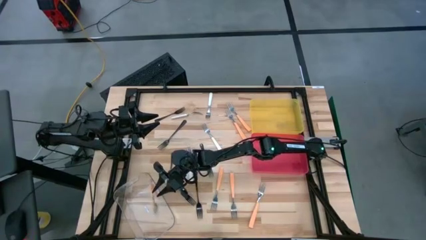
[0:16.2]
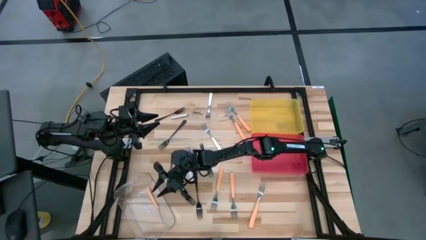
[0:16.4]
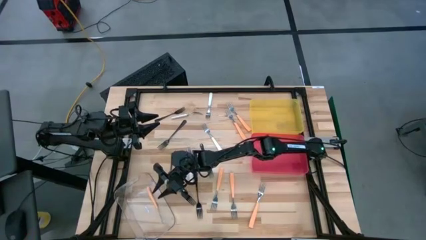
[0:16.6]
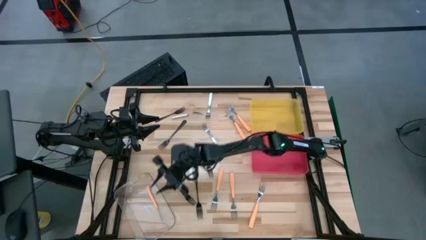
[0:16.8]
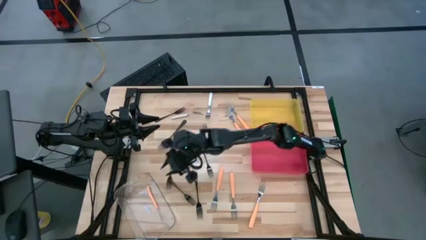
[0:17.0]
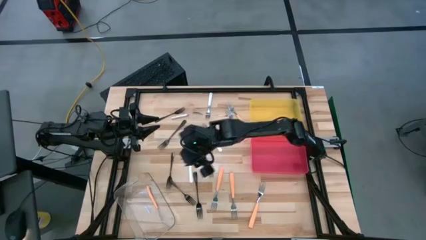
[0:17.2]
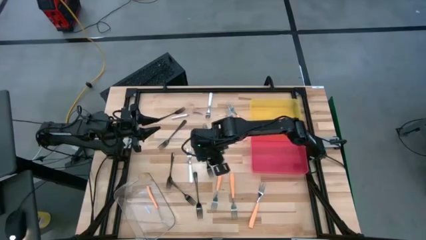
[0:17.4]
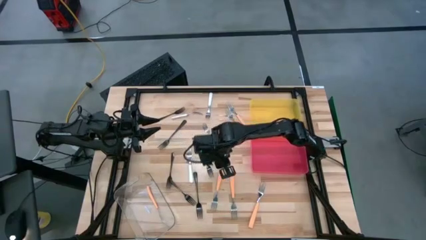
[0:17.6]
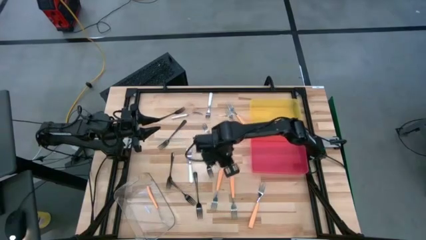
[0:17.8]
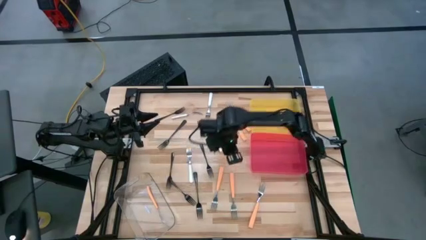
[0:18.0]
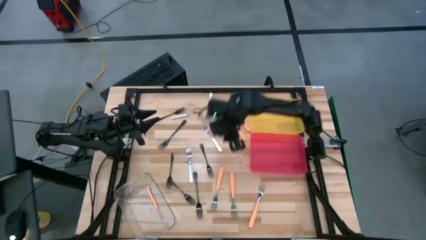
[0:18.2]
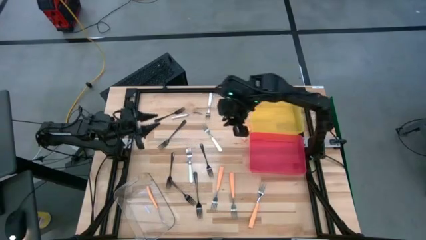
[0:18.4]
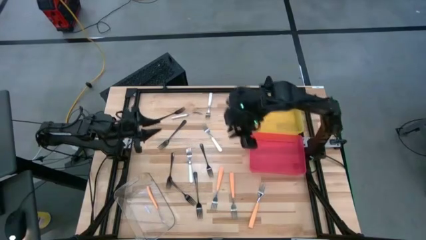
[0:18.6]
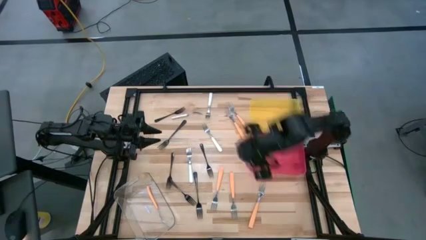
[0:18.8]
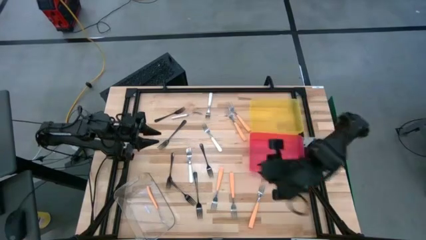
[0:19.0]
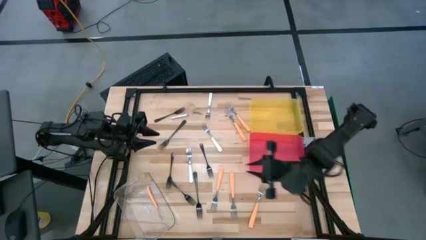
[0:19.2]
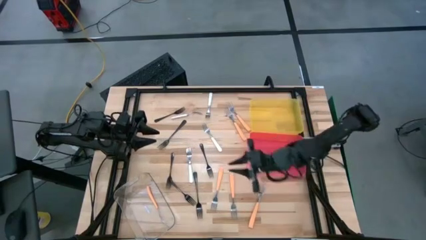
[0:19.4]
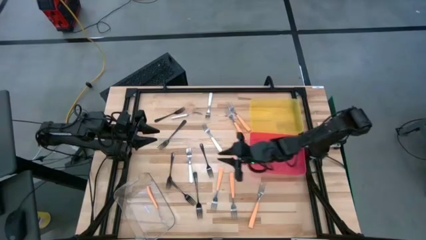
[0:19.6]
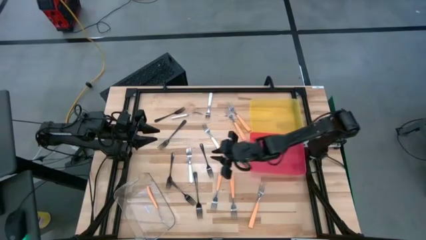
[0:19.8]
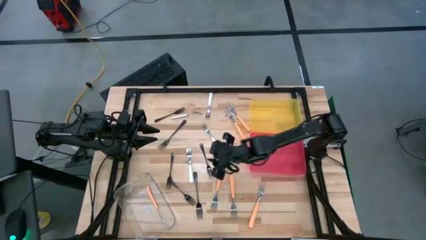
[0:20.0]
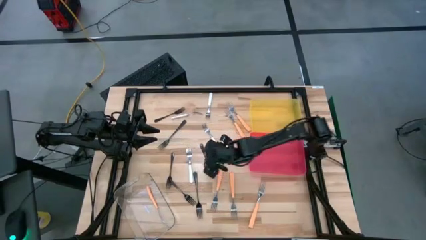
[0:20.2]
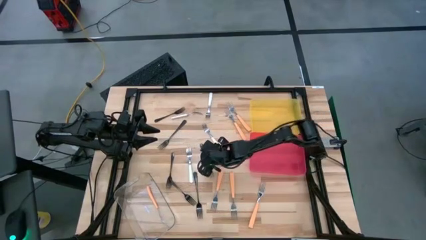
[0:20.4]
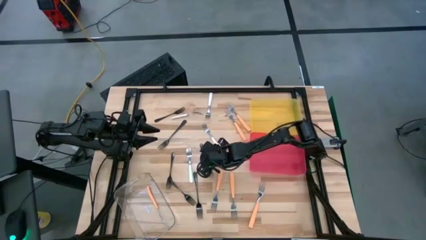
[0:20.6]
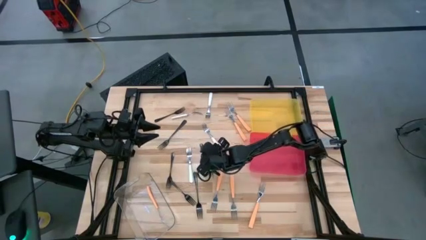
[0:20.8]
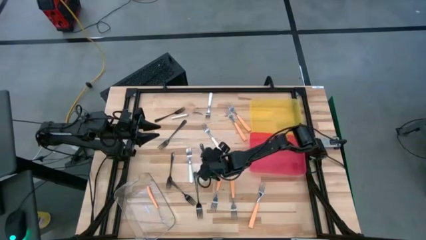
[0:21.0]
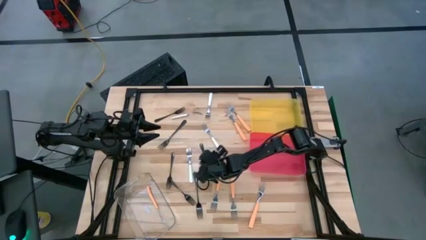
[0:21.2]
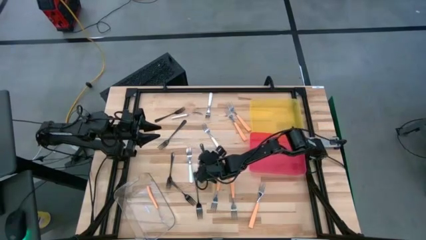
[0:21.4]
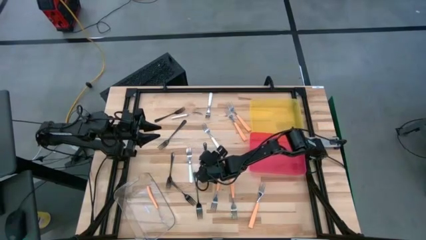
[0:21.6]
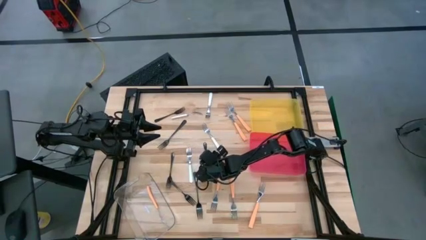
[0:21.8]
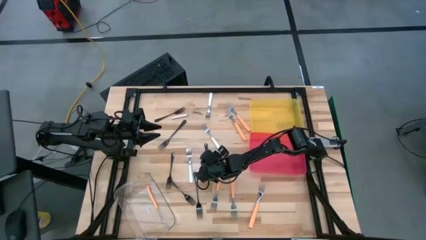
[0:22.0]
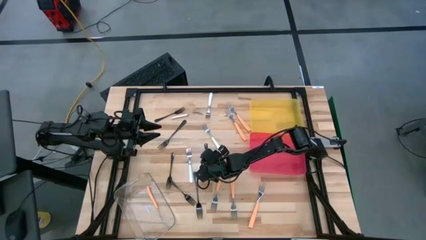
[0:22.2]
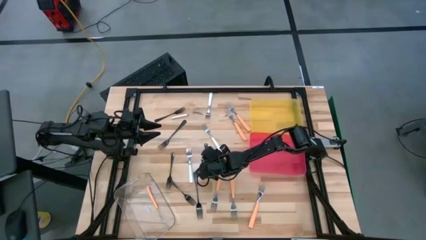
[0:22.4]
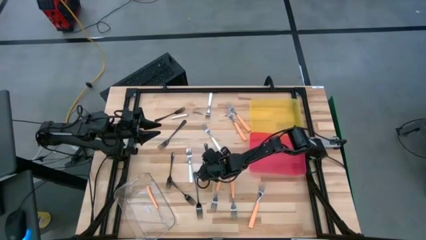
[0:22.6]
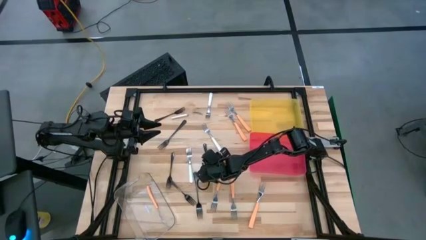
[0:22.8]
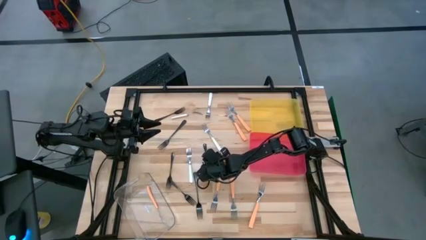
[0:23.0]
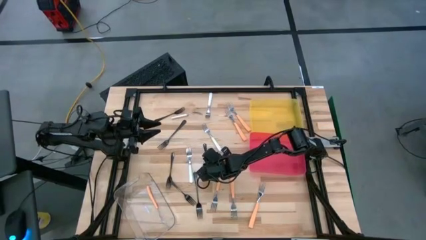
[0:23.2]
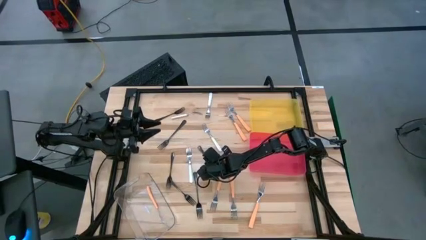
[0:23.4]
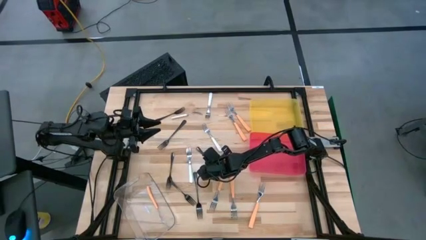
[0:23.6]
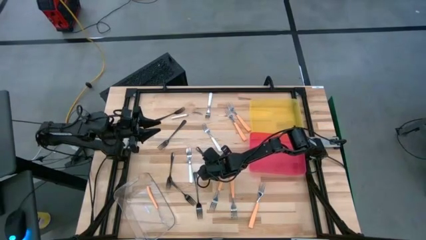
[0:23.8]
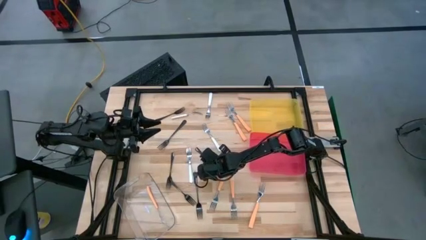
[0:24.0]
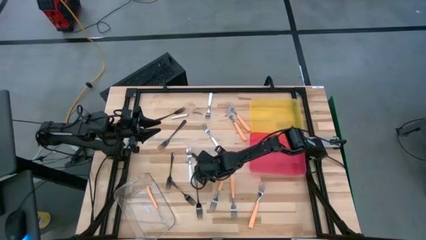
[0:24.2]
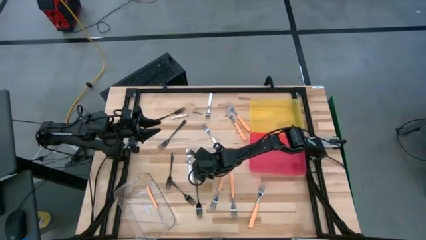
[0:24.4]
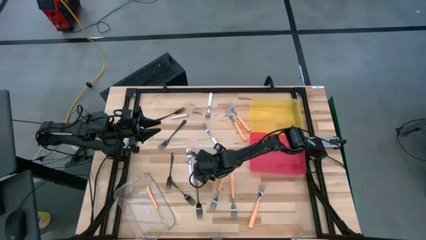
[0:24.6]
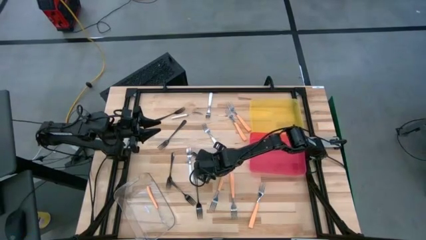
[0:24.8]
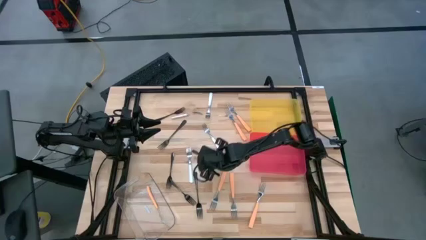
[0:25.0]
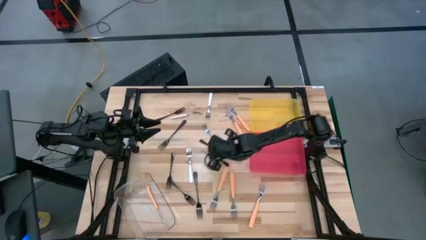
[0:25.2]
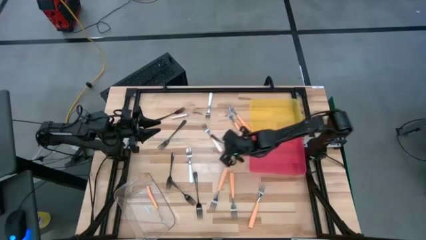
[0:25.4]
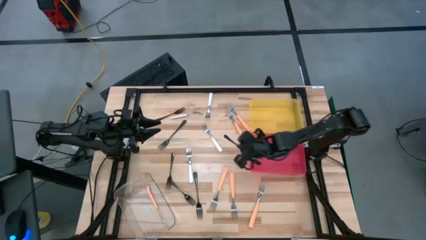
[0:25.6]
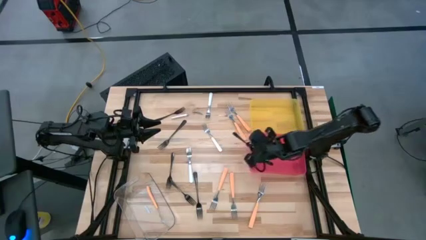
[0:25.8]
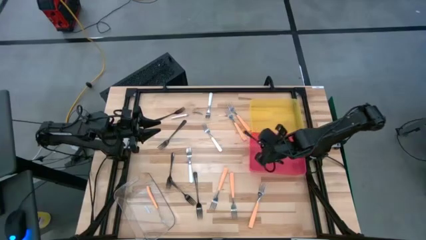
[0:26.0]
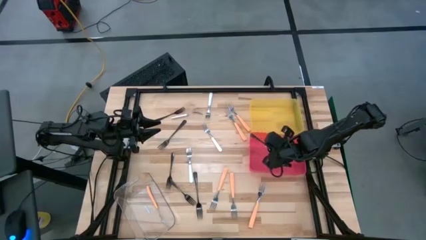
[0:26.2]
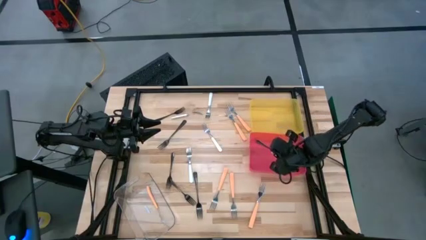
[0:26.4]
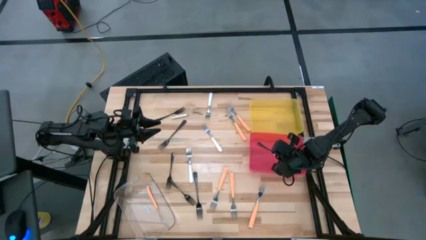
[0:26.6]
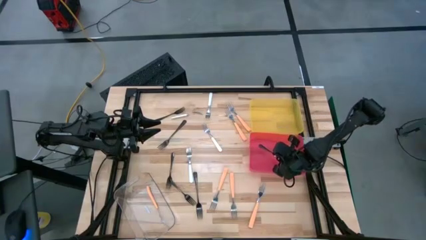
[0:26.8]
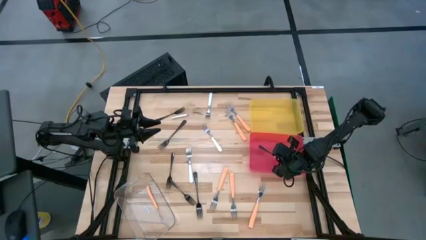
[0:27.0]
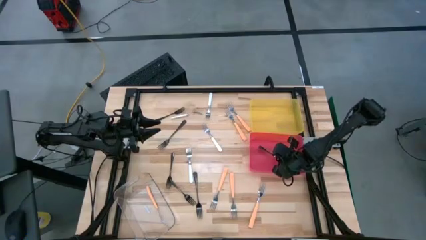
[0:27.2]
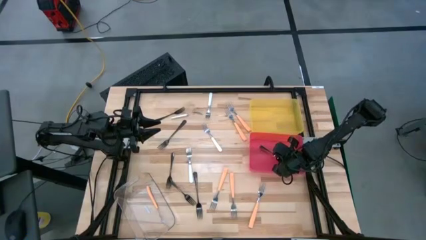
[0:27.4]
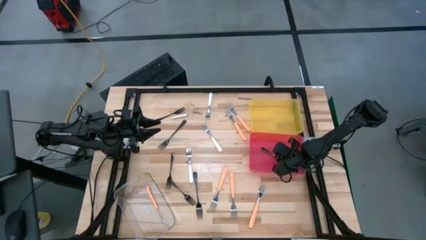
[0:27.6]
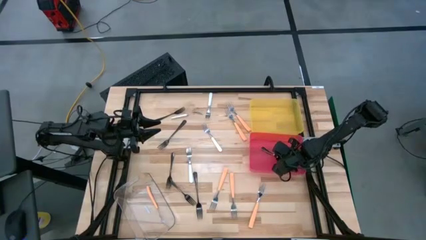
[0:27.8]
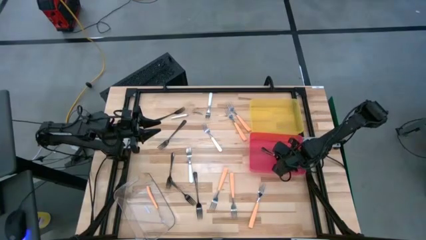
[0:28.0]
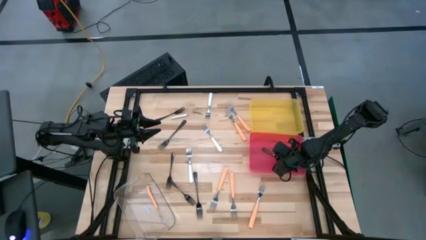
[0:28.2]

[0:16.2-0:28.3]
Task: Sort silverware by color (type)
Put the black fork into the red bin
